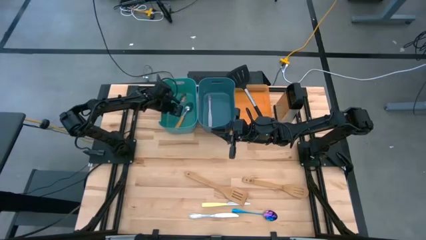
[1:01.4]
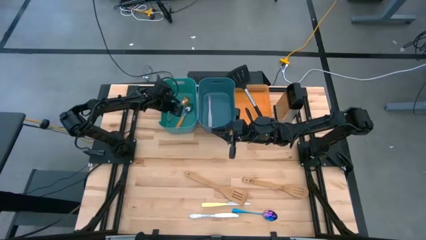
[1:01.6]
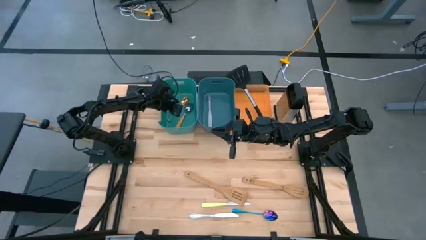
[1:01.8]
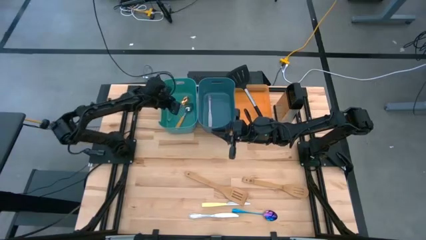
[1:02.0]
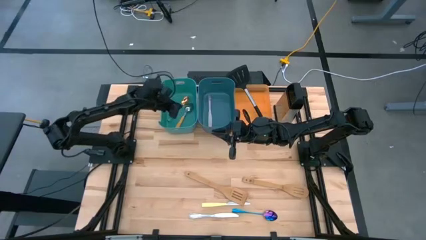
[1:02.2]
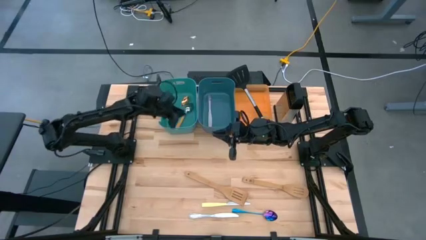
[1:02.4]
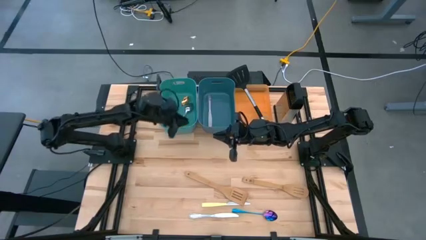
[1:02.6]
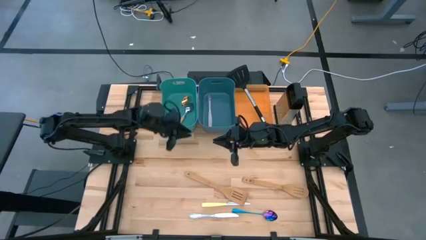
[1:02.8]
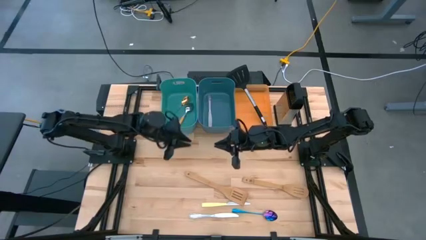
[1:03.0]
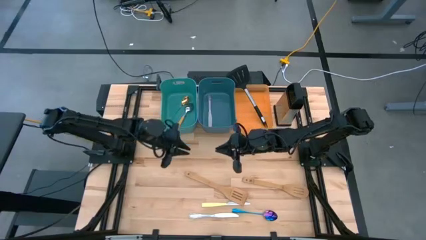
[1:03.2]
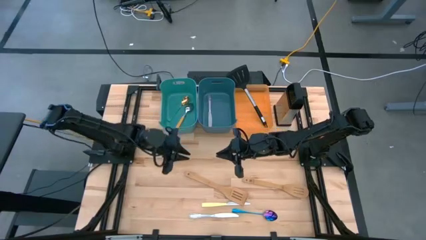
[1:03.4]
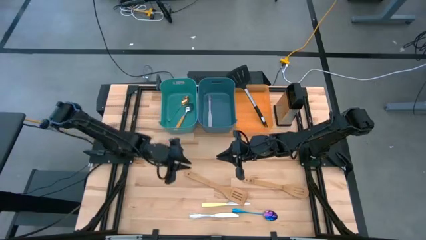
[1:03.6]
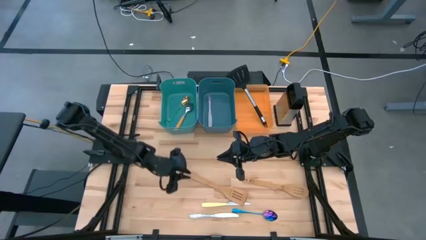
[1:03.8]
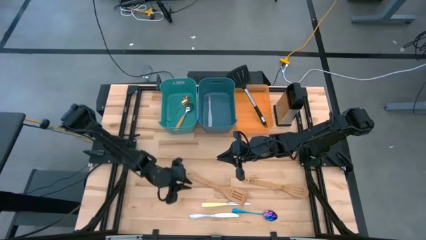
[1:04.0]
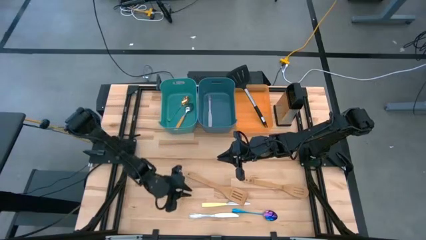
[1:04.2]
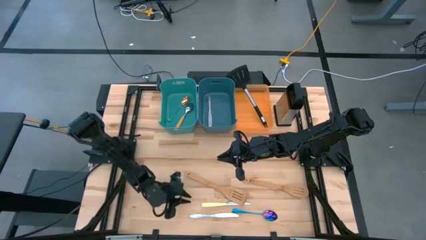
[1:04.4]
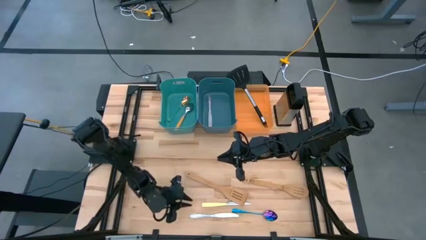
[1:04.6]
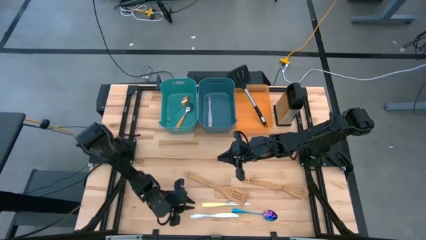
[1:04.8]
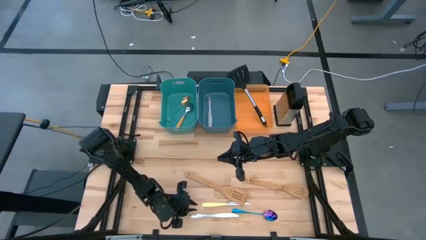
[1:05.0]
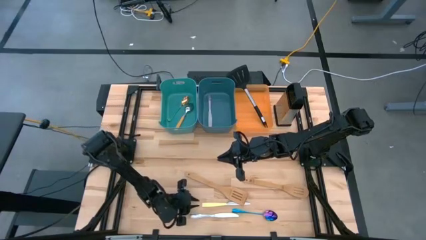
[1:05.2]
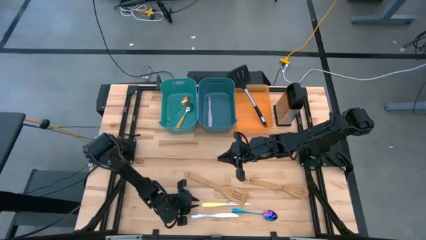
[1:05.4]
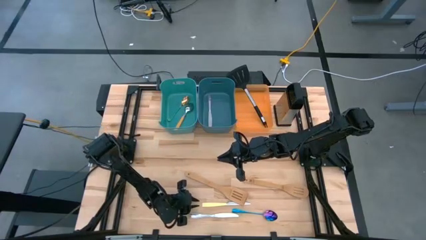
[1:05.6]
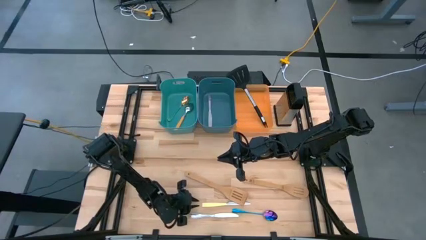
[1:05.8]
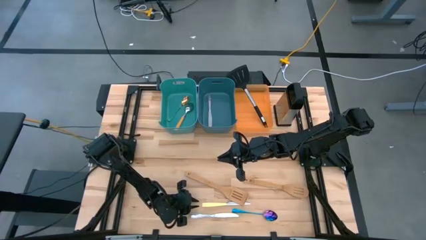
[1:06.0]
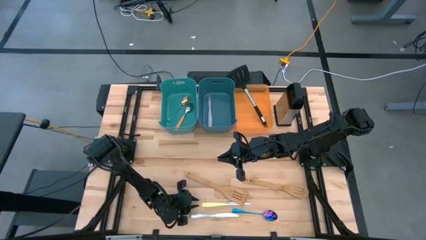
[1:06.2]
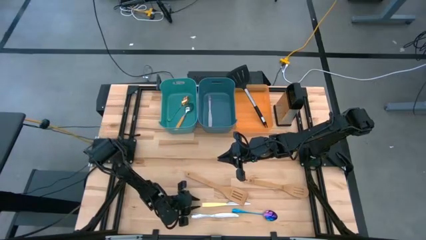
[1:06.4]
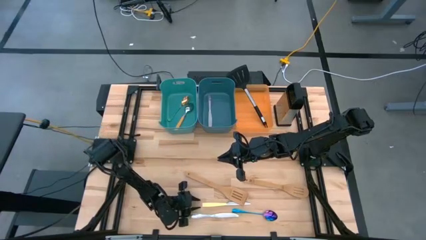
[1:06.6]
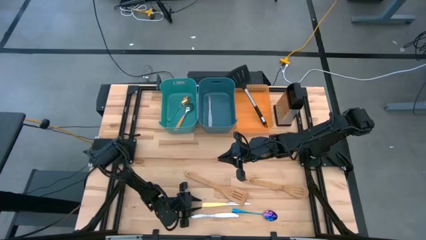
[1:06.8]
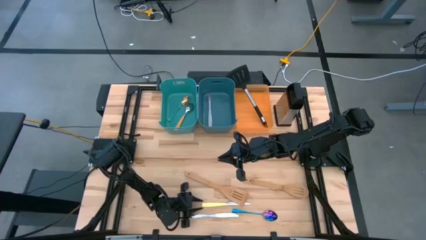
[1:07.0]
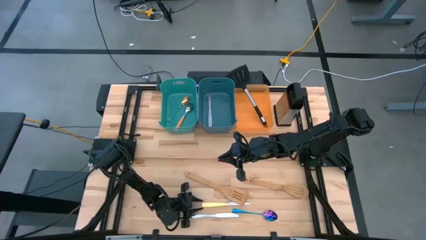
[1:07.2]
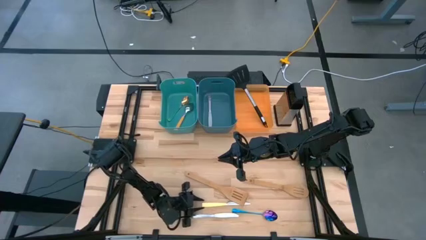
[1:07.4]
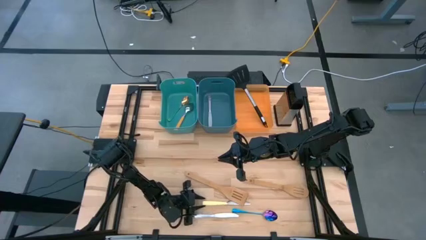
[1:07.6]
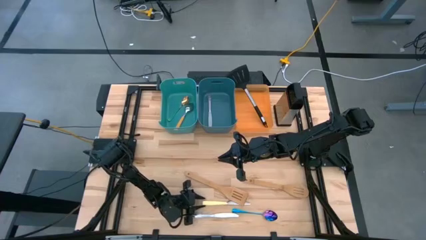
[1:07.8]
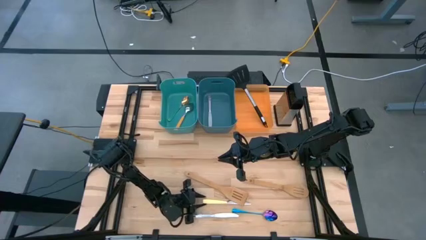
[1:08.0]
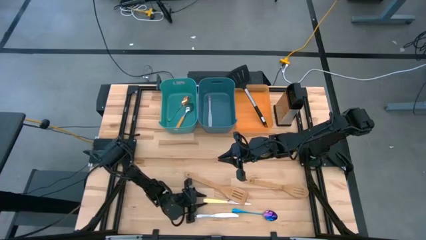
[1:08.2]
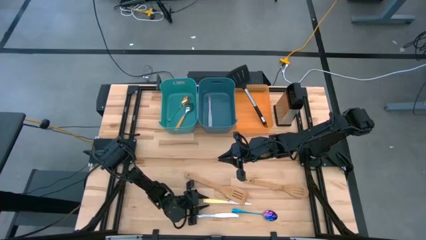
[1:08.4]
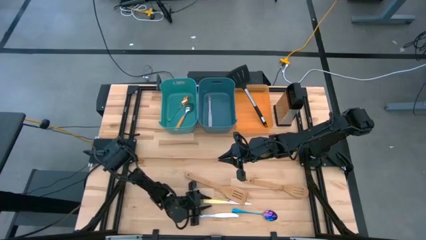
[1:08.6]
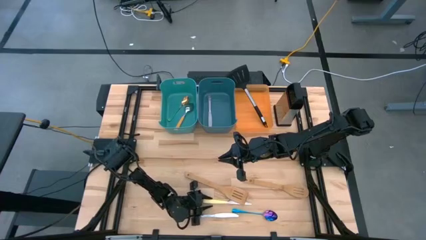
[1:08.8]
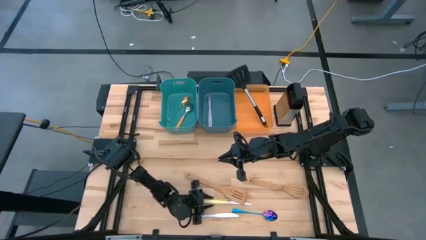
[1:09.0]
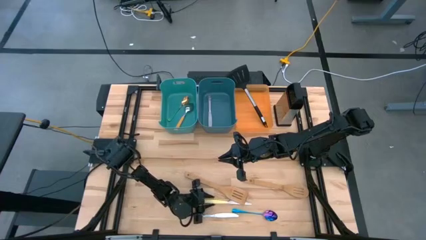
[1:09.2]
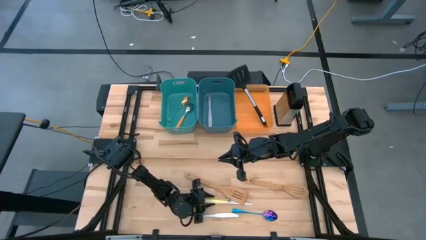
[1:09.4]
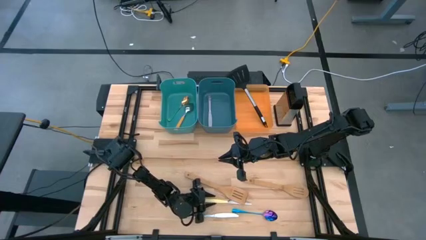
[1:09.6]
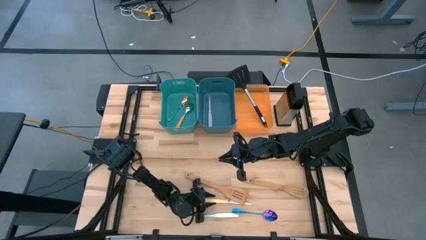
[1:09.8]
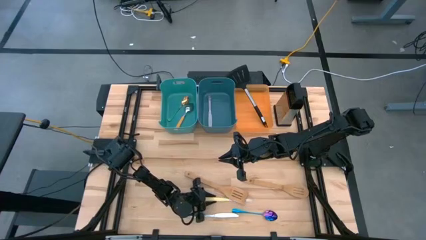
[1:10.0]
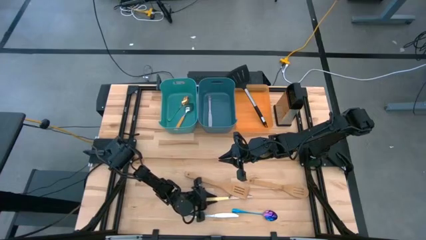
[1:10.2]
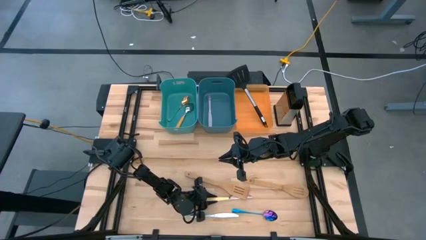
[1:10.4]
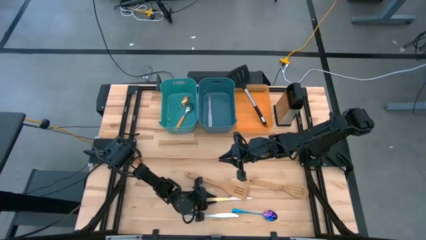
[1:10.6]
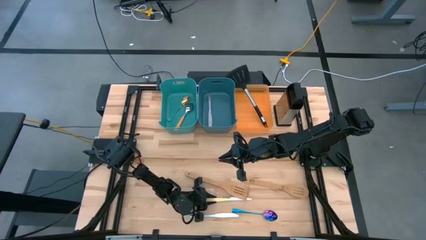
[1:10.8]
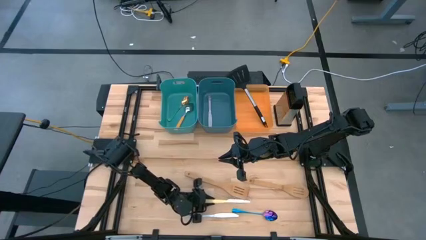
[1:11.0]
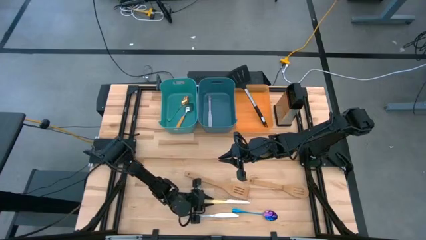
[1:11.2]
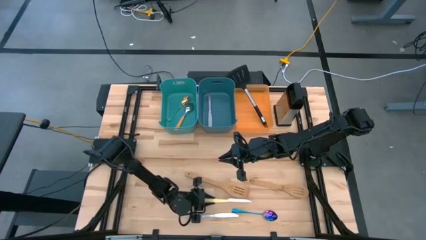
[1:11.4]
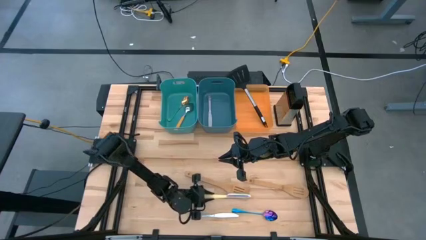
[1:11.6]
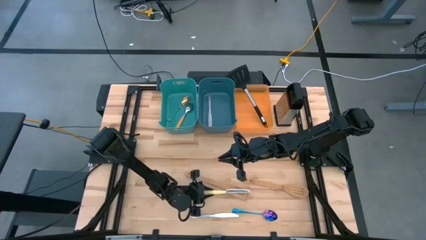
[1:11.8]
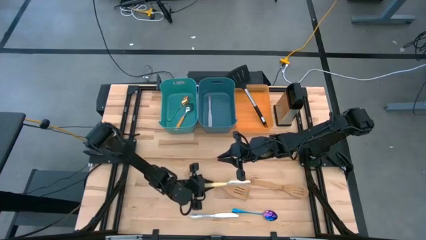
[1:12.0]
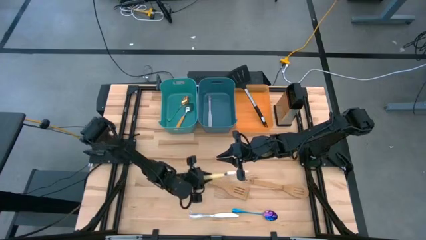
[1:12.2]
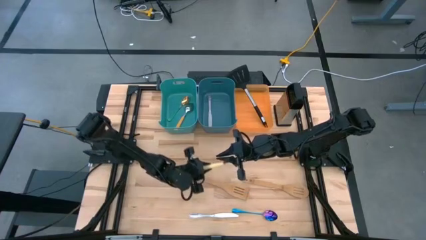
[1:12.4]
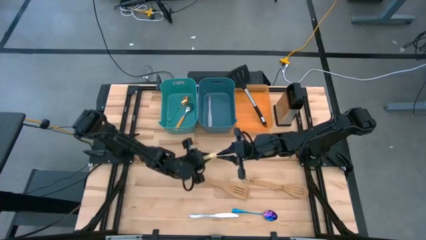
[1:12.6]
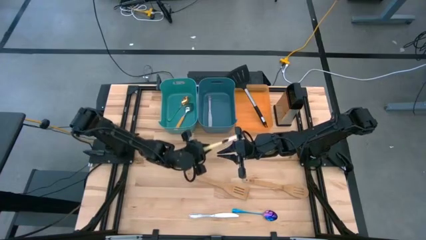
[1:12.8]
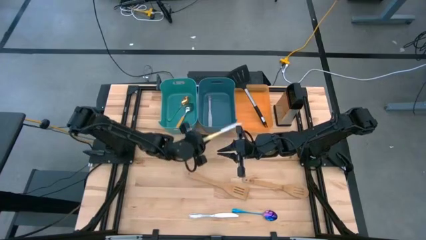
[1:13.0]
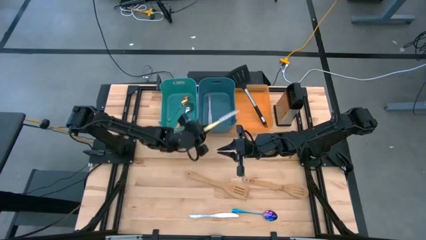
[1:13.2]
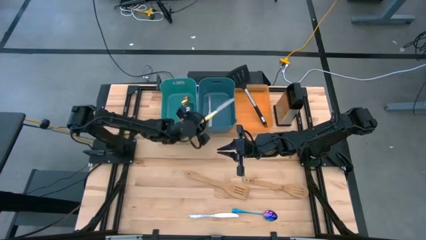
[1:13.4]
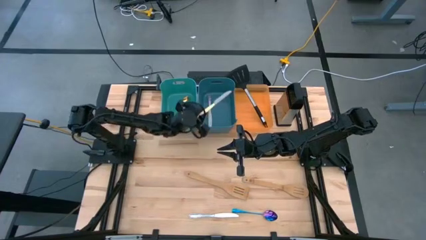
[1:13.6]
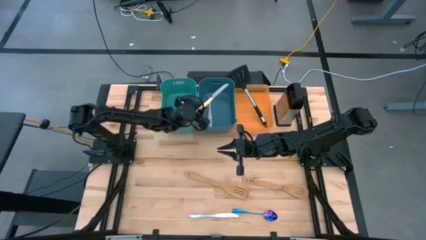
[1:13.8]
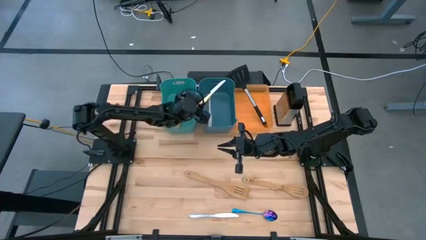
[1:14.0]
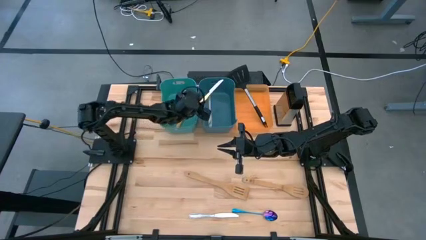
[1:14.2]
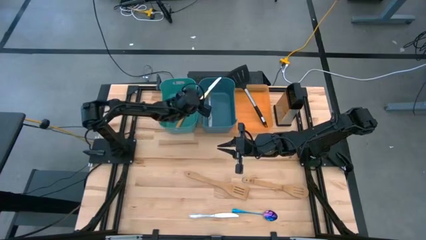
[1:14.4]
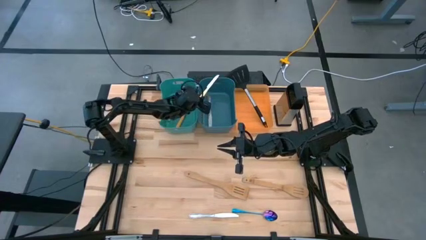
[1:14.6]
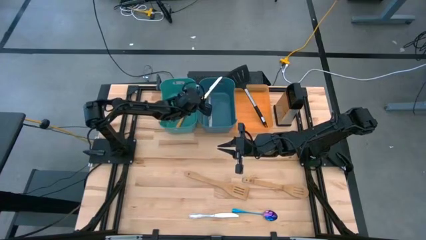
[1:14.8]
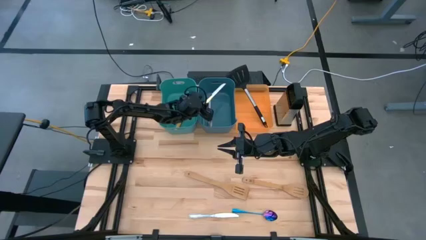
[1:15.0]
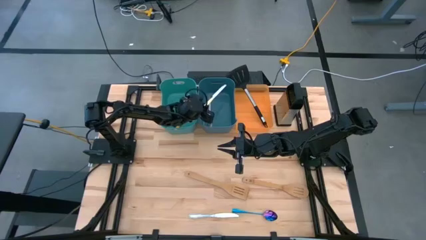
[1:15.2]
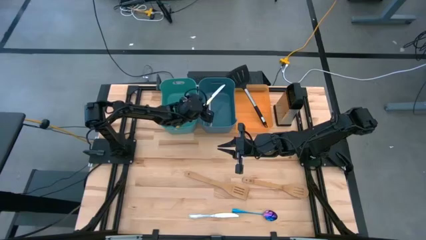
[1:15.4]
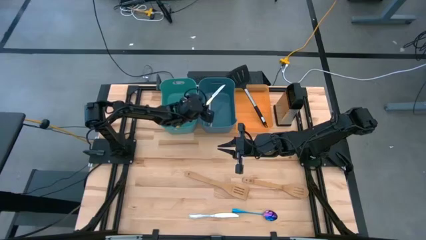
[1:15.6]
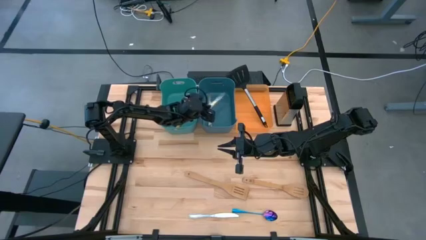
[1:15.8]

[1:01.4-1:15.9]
Task: Pick & Place Kitchen Items
Put the yellow table knife into the blue bin

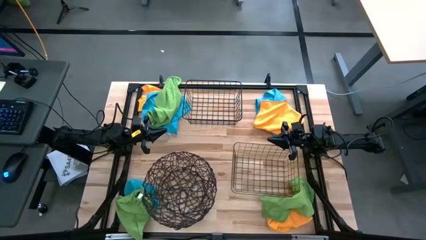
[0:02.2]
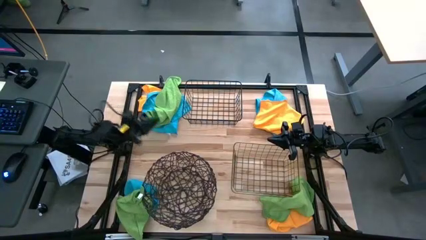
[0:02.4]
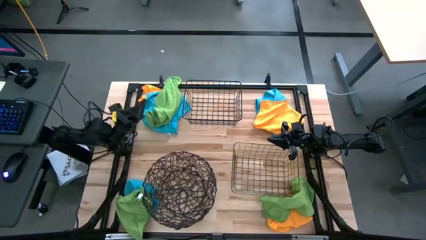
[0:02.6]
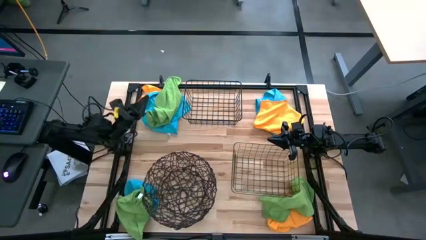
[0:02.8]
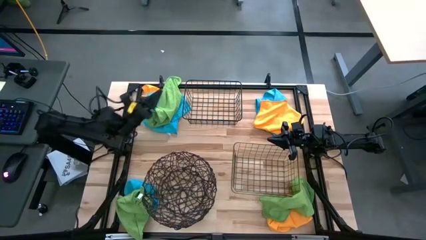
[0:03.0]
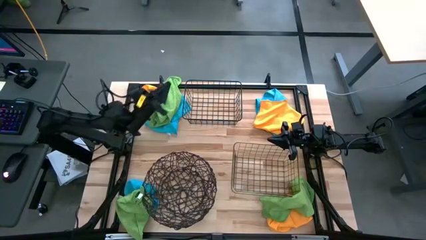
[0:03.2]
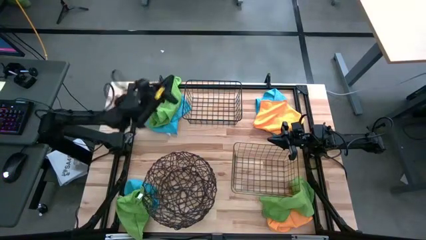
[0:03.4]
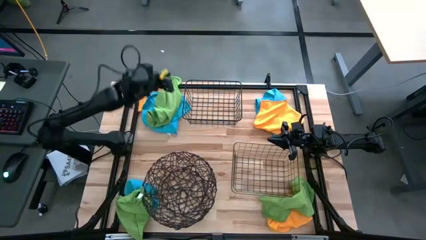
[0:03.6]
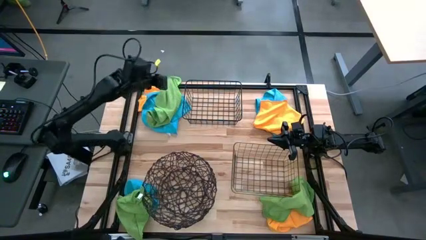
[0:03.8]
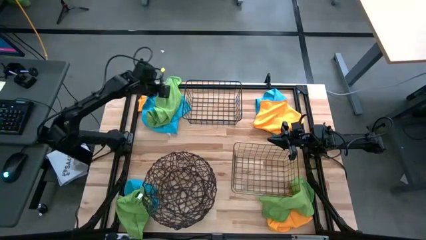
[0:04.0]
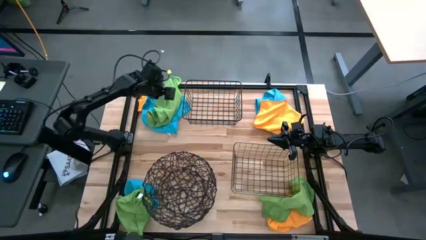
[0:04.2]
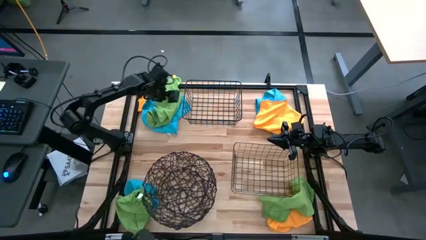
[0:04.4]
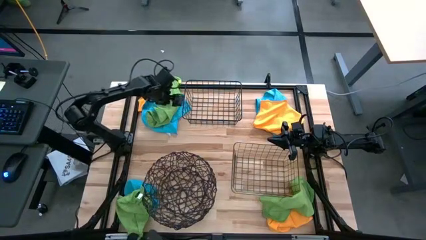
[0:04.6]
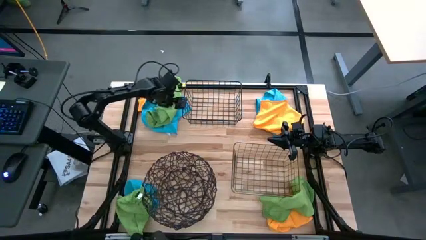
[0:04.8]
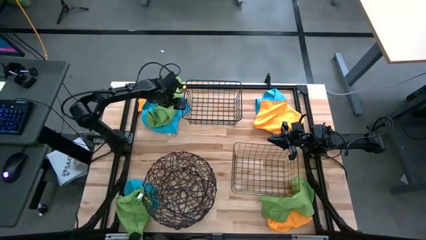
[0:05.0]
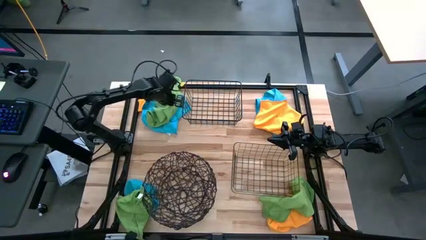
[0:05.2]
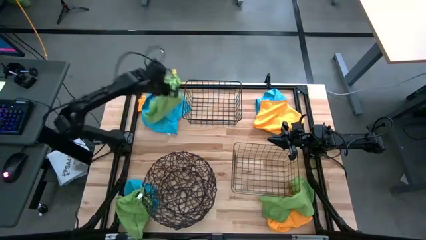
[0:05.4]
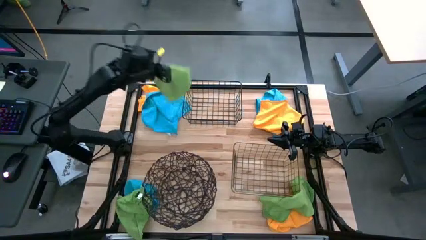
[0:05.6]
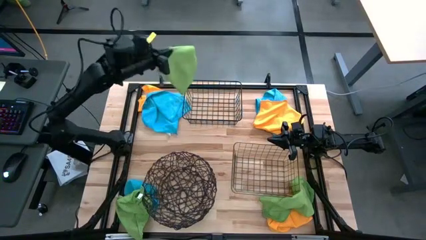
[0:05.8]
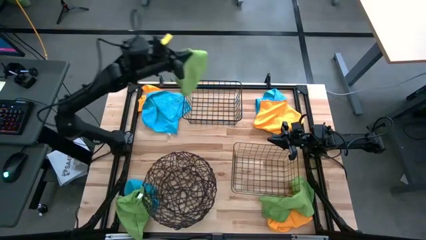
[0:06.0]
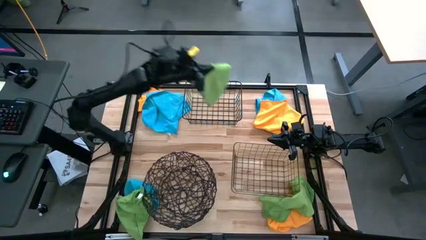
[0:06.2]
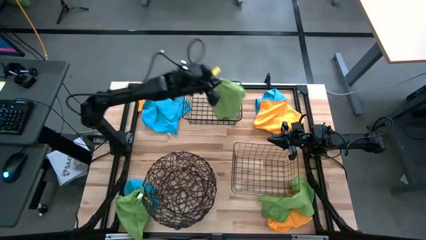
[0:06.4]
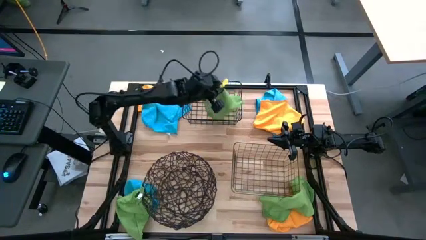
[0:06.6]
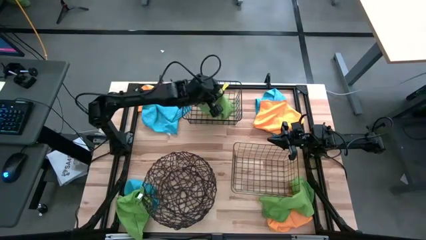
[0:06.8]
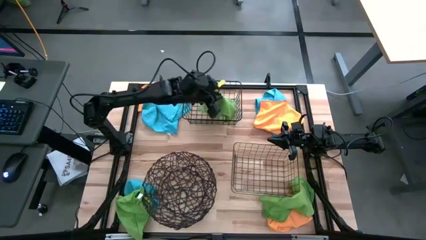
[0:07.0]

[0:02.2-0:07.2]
Task: Sort microfiber towel by color & place in baskets
Put the top left green towel into the top black wire basket
